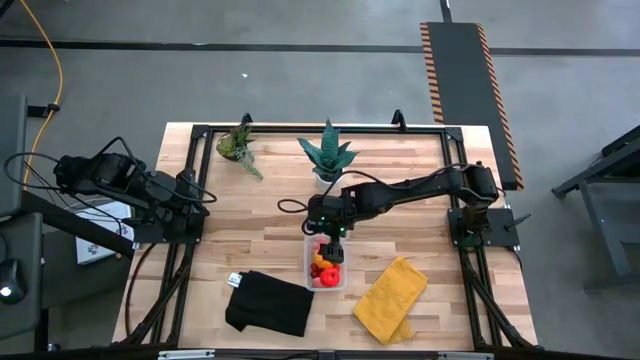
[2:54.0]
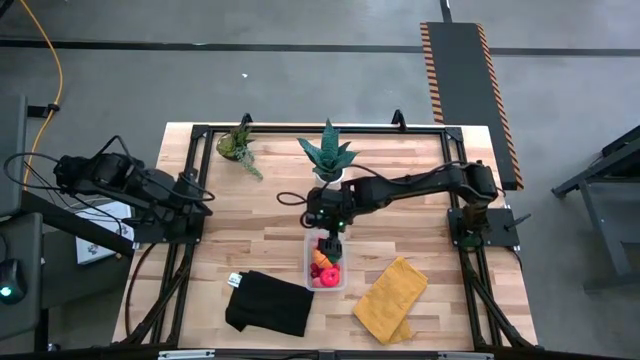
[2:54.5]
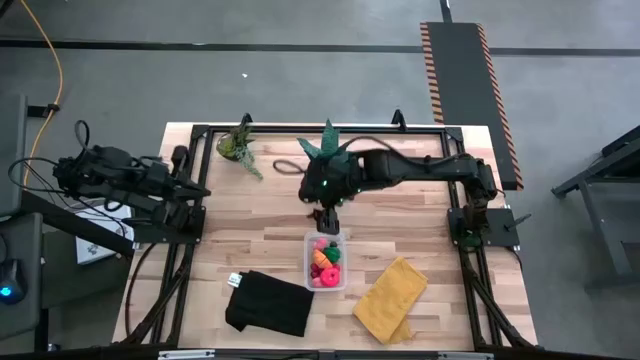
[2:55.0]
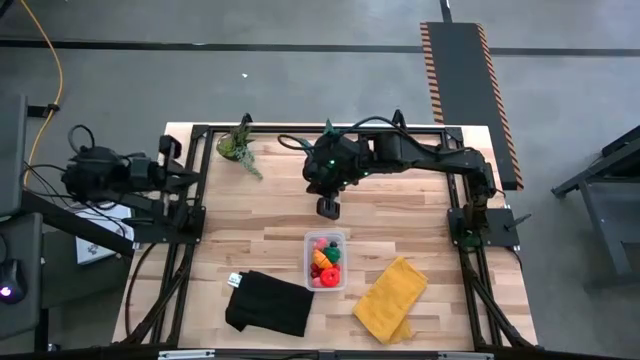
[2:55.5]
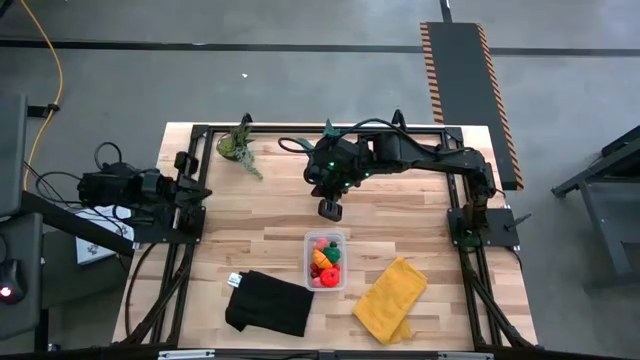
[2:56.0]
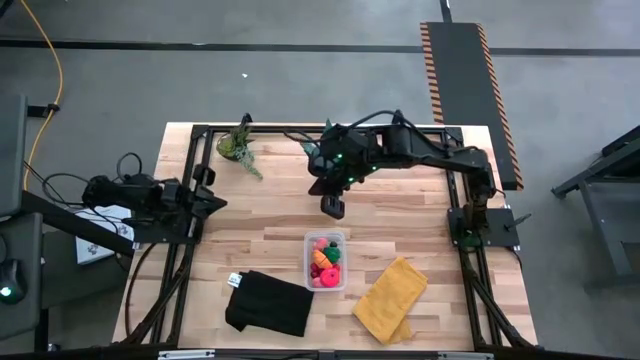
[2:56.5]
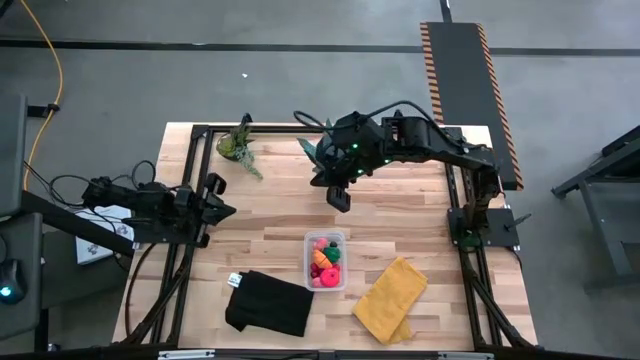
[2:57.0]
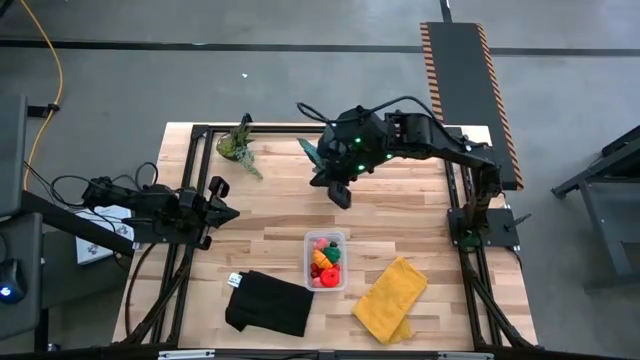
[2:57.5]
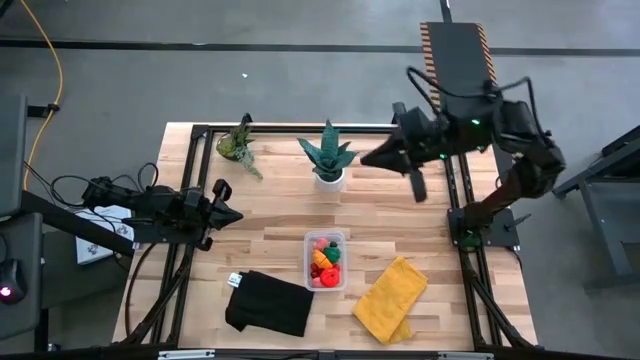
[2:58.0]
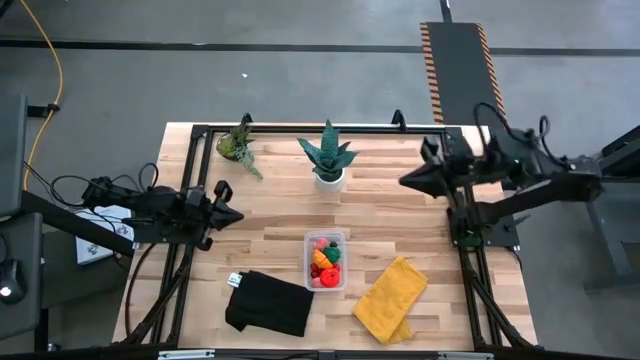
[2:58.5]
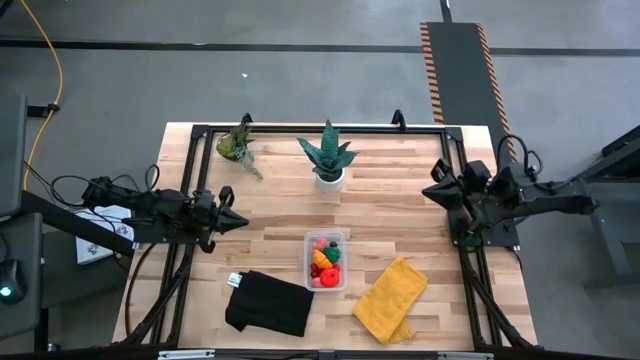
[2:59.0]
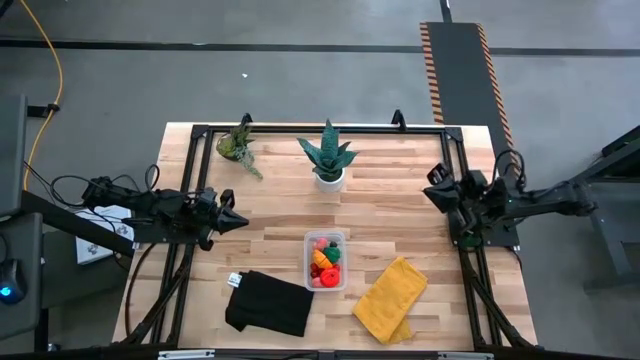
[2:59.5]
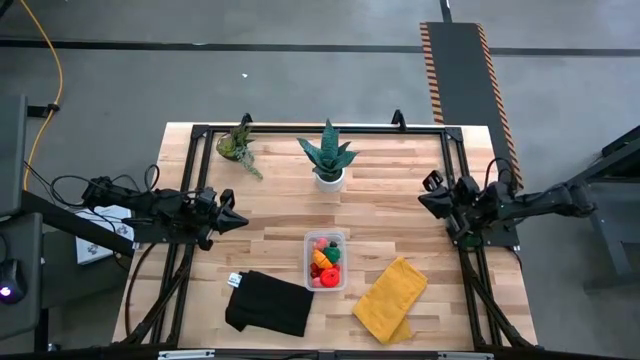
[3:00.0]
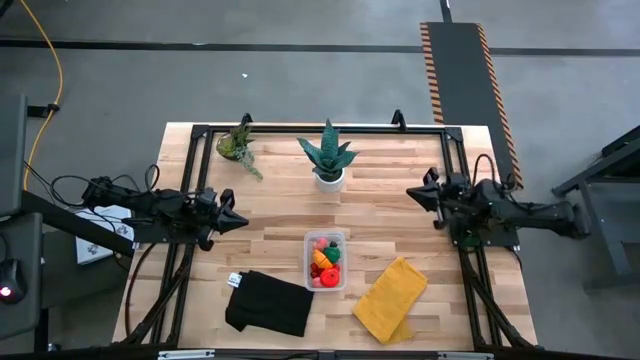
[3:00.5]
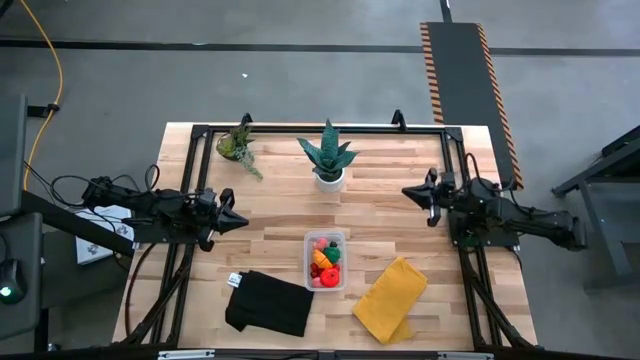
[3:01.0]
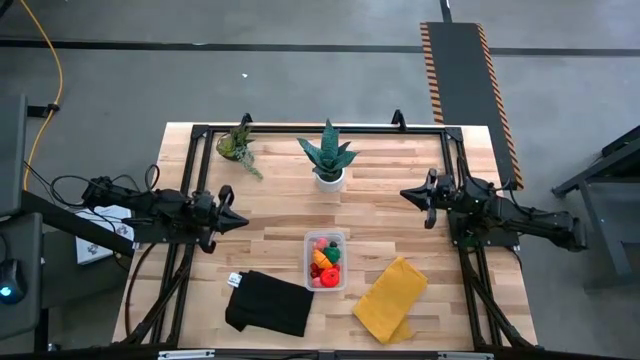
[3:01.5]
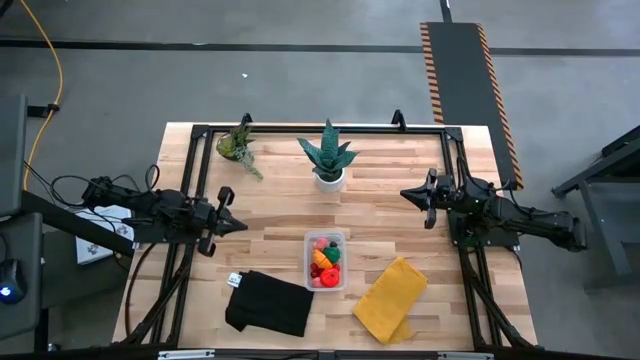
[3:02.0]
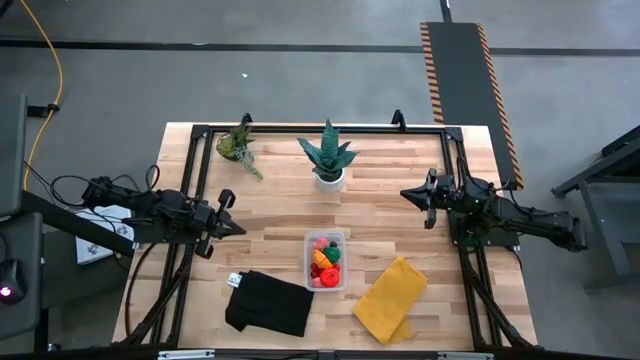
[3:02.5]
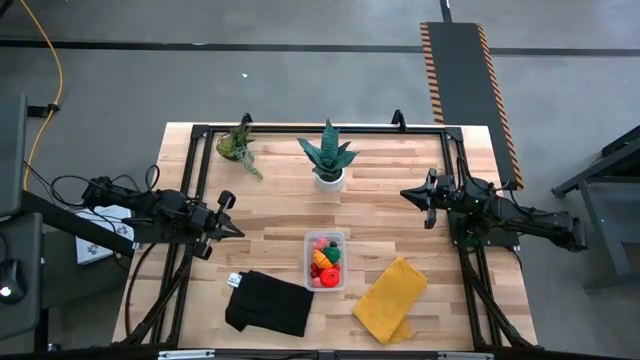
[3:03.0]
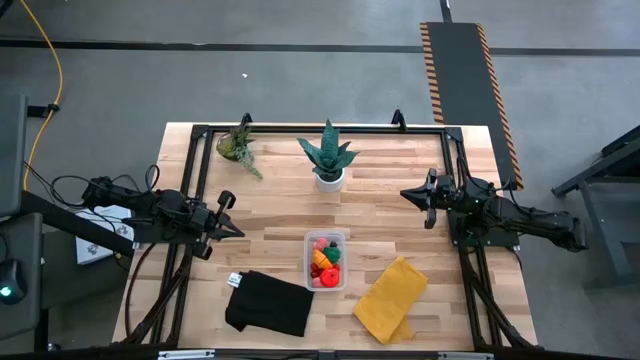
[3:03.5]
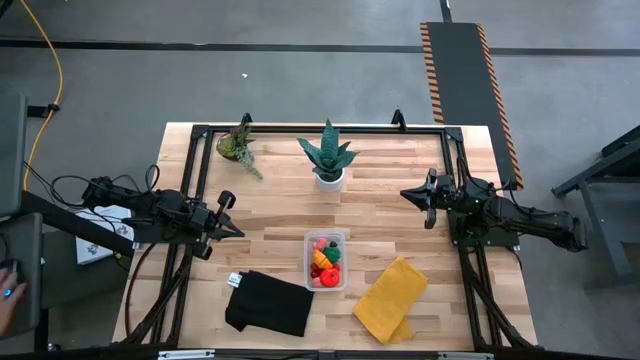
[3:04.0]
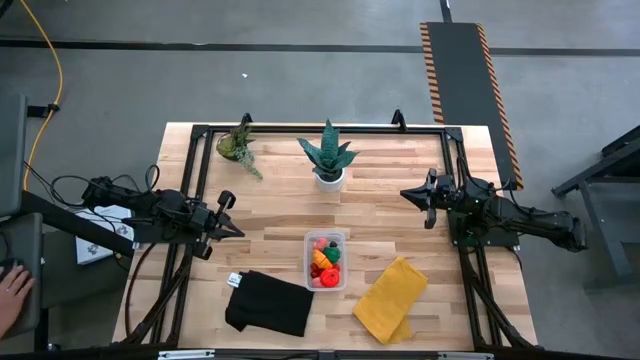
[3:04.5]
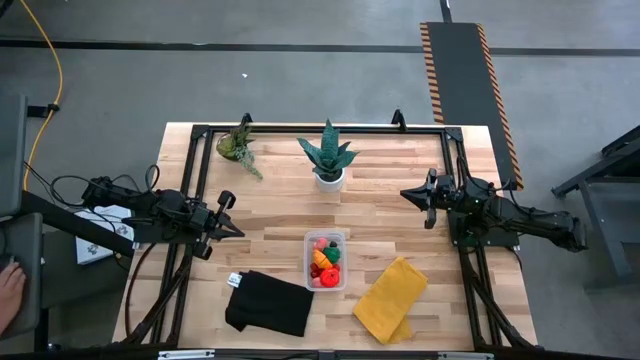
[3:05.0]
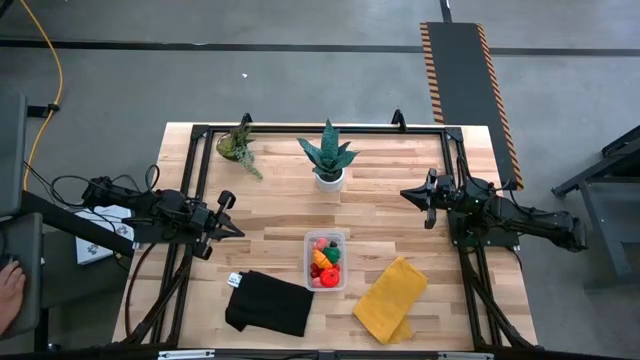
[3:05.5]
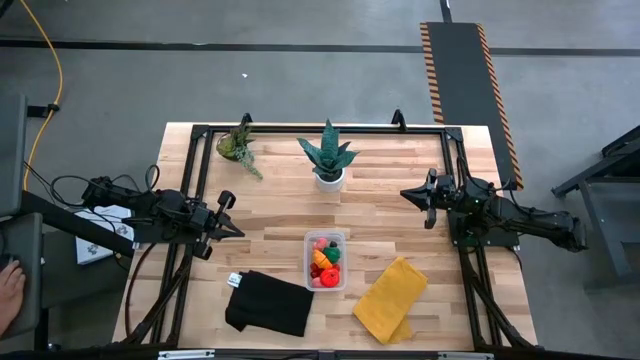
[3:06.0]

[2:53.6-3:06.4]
Task: Pick and placing Produce into tupperware
Return to Home Position

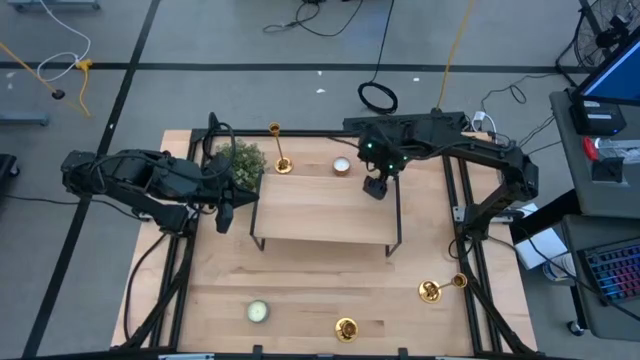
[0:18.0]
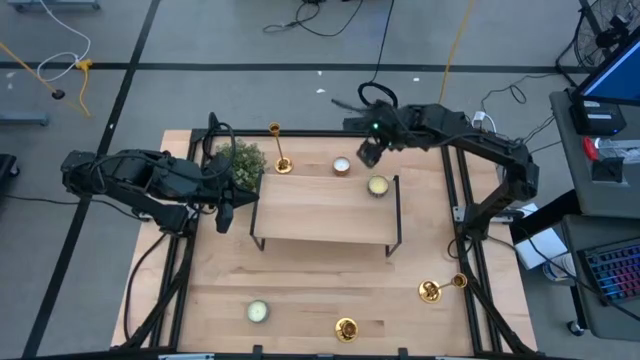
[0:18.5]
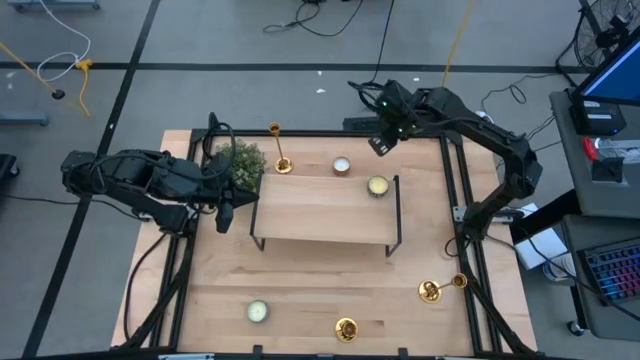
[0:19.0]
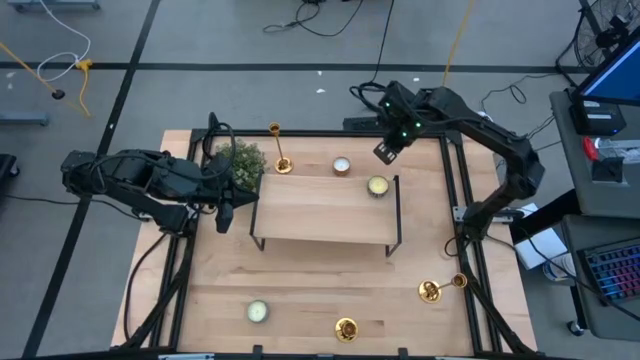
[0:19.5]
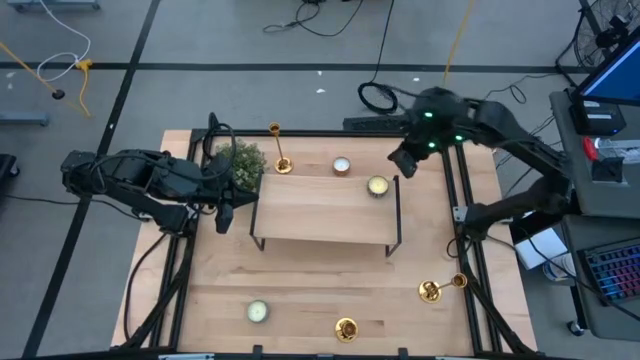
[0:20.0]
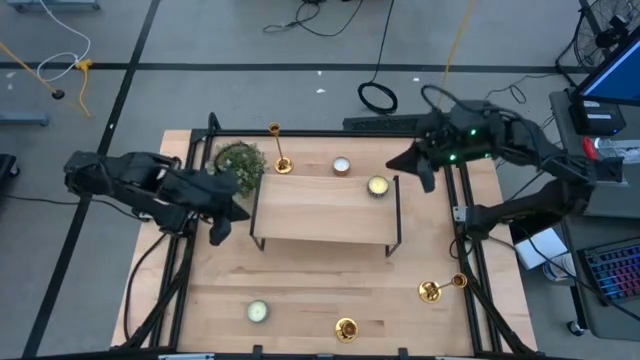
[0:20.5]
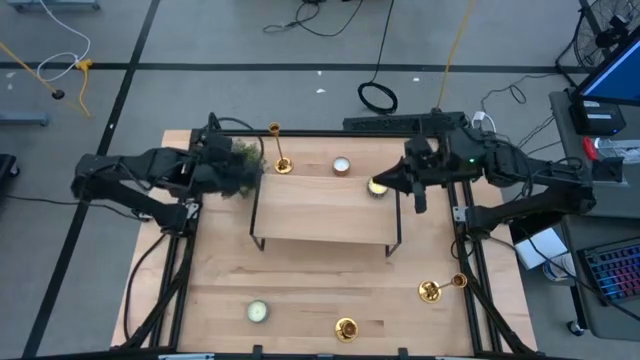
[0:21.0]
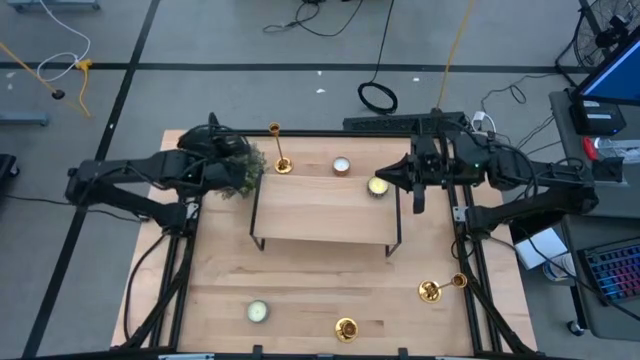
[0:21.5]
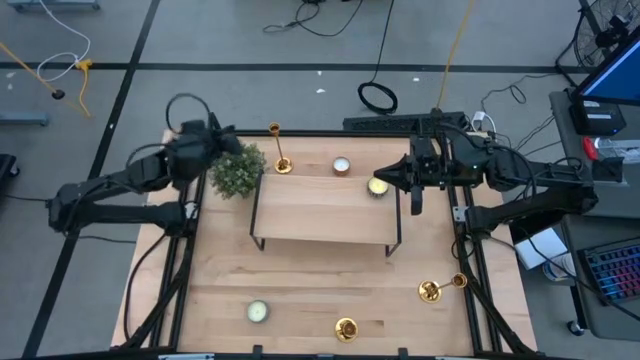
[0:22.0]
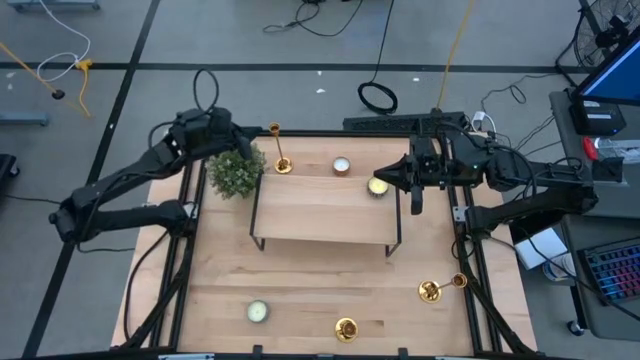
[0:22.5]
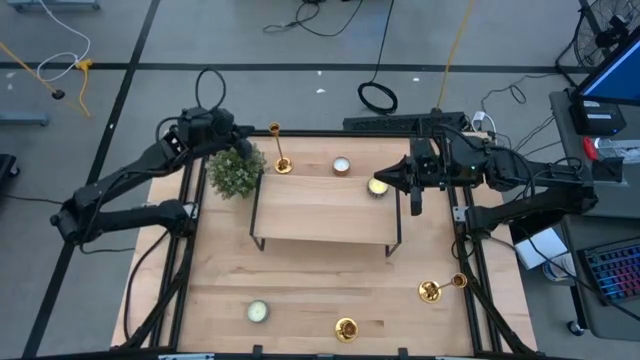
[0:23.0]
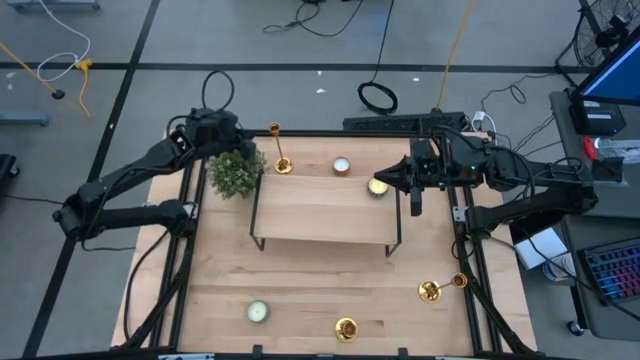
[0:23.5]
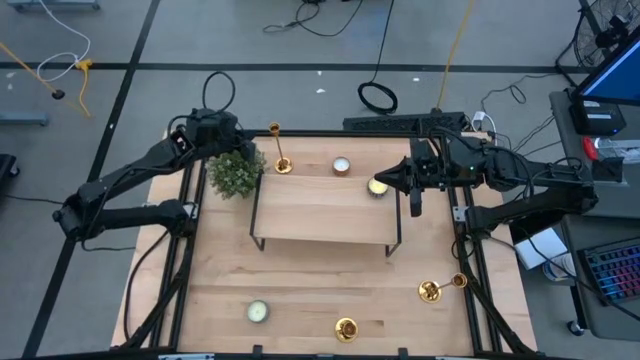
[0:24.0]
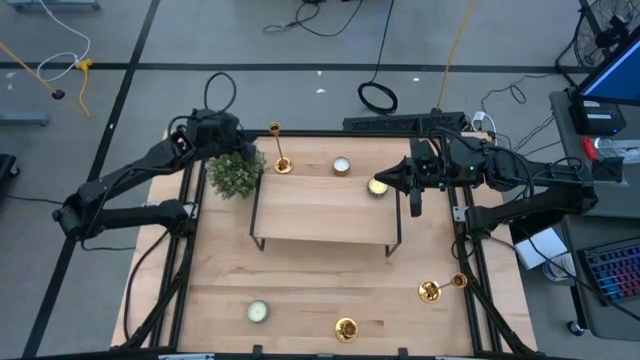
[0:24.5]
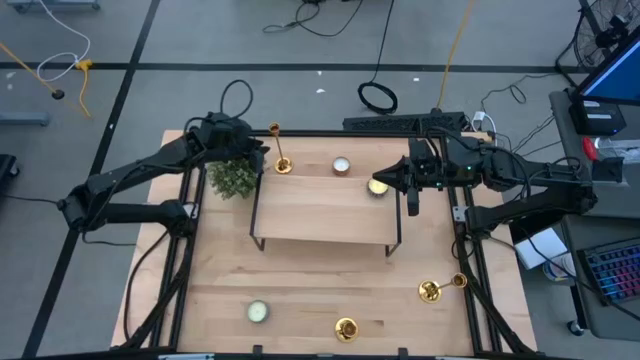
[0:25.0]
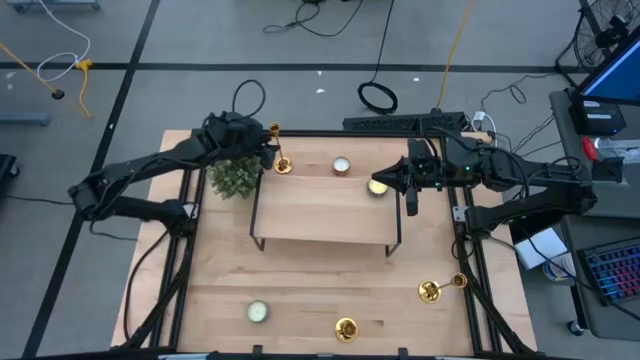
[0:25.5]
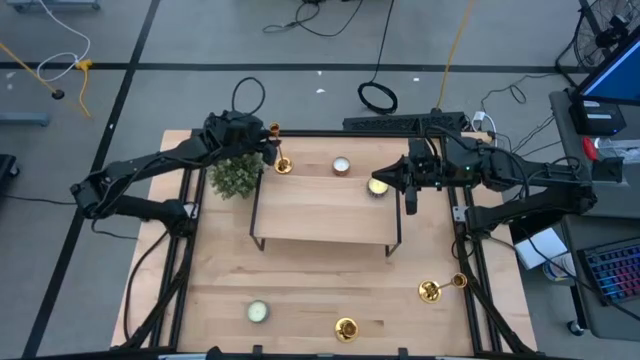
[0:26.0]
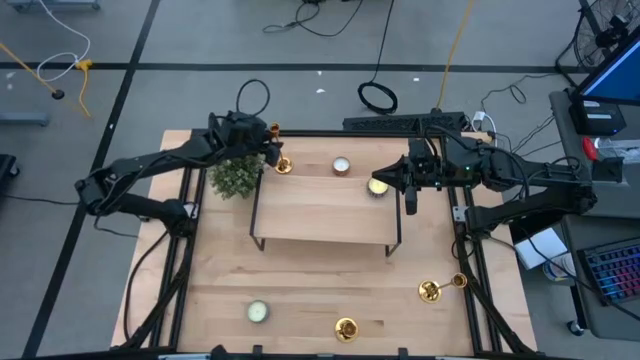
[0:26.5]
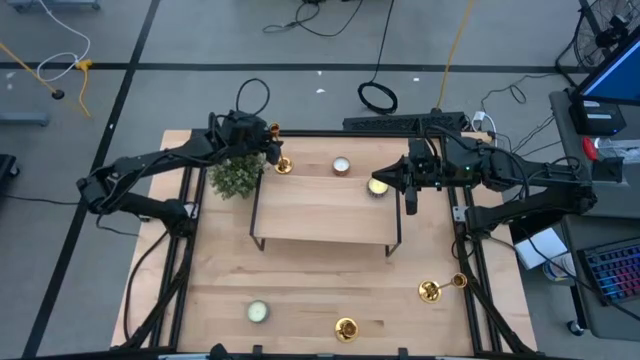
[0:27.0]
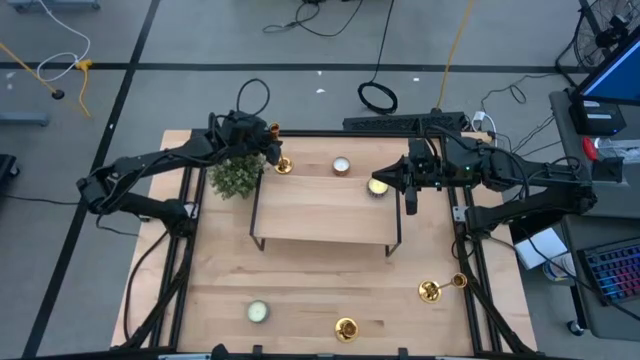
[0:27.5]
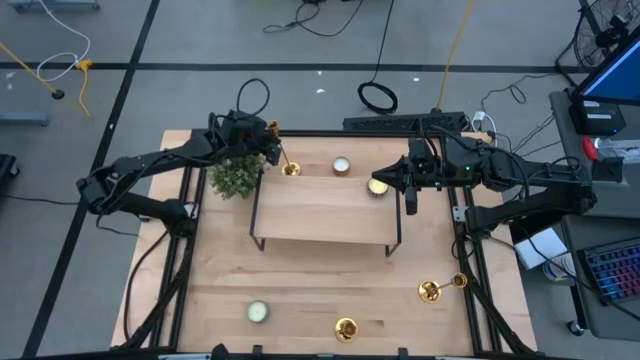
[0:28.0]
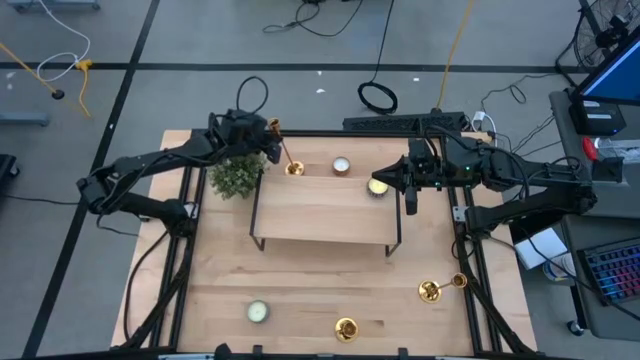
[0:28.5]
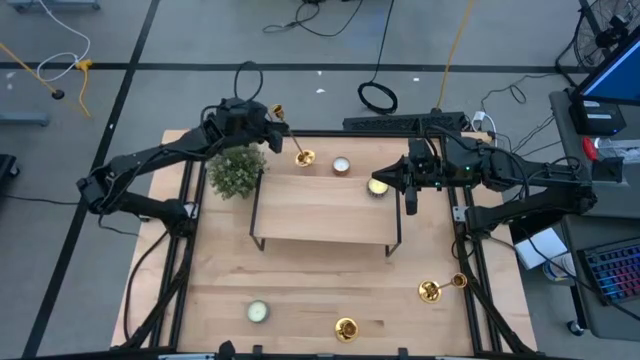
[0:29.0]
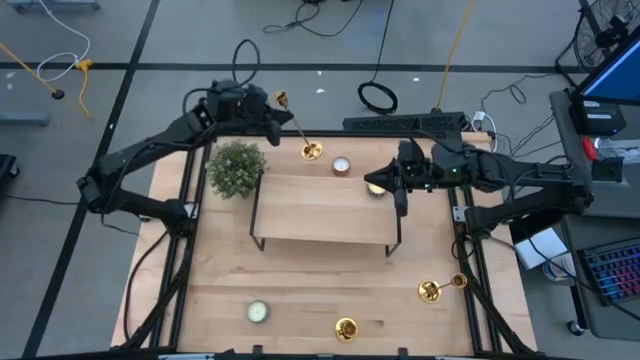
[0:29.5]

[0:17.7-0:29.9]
Task: Pick & Place candle stick holders
Put the top gold candle holder on the shelf
